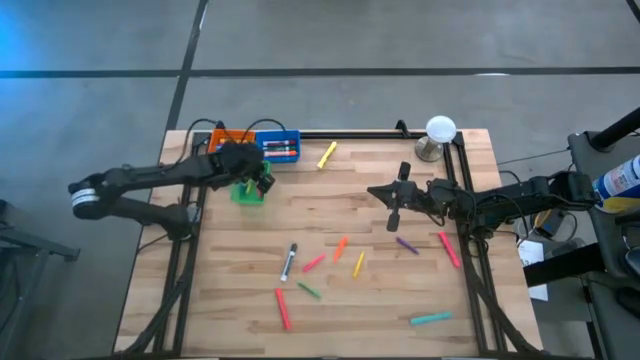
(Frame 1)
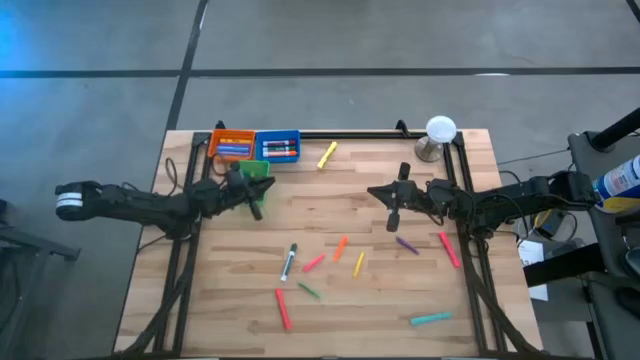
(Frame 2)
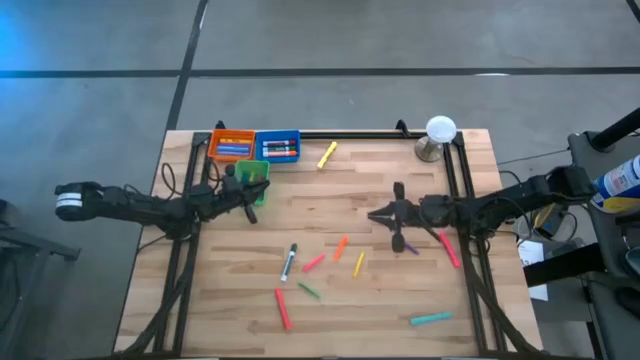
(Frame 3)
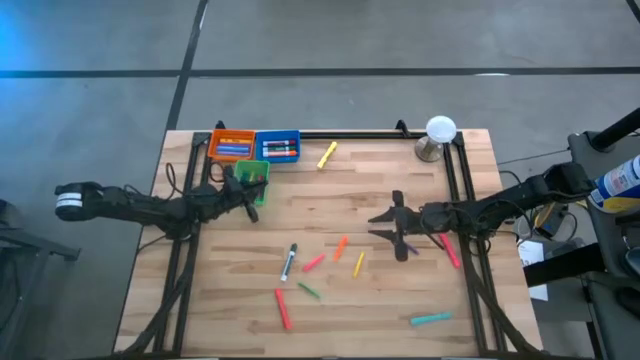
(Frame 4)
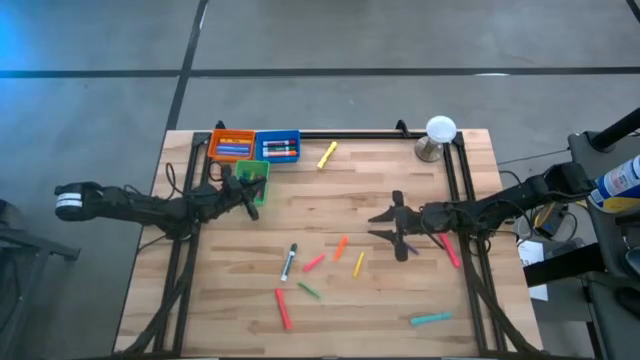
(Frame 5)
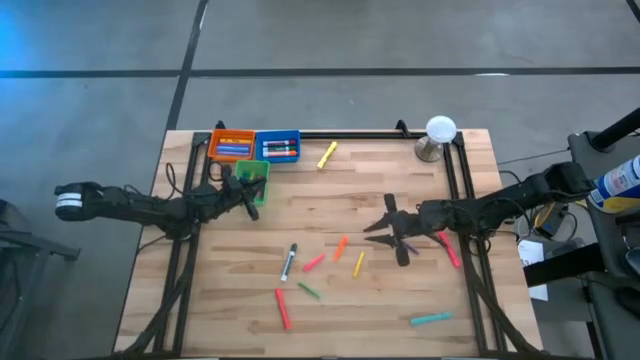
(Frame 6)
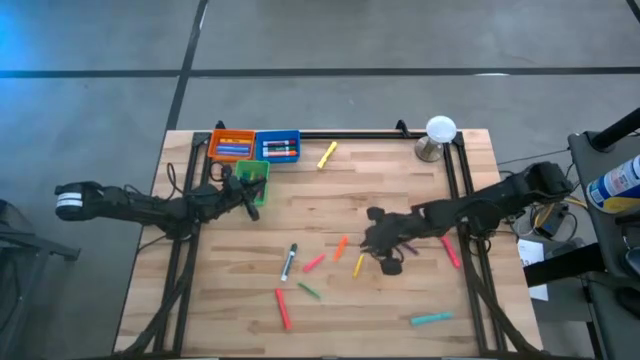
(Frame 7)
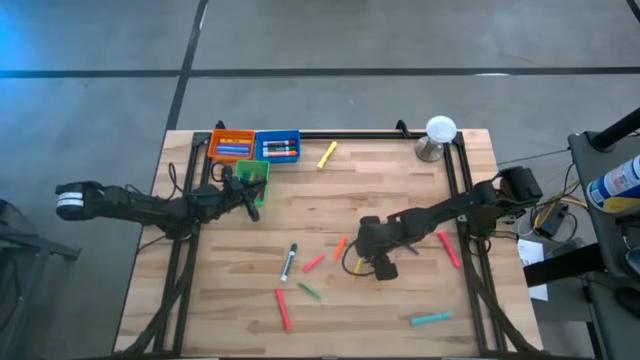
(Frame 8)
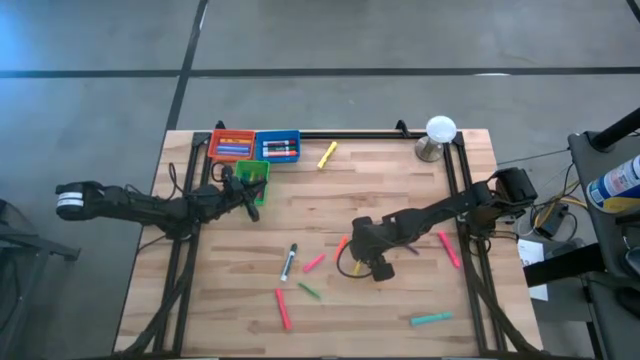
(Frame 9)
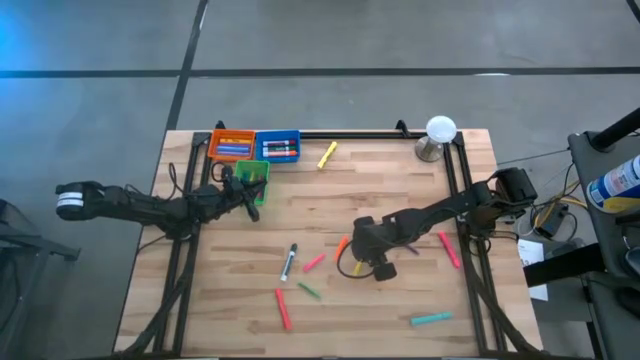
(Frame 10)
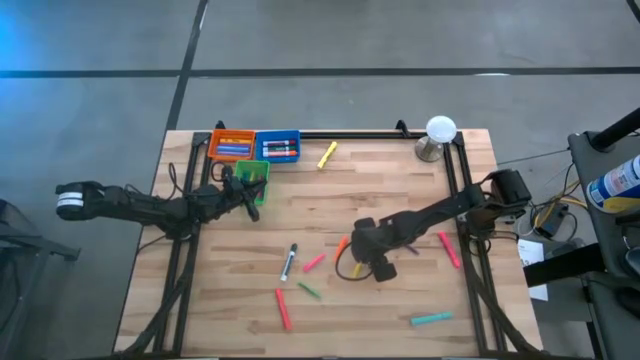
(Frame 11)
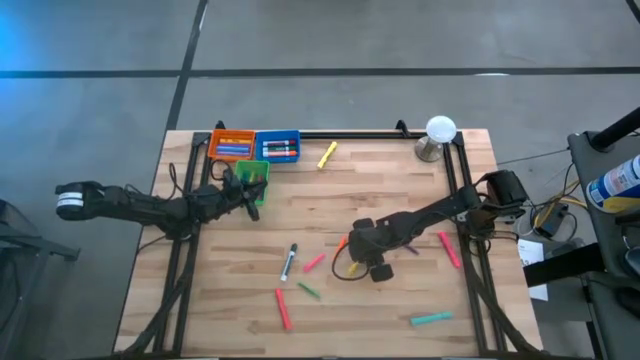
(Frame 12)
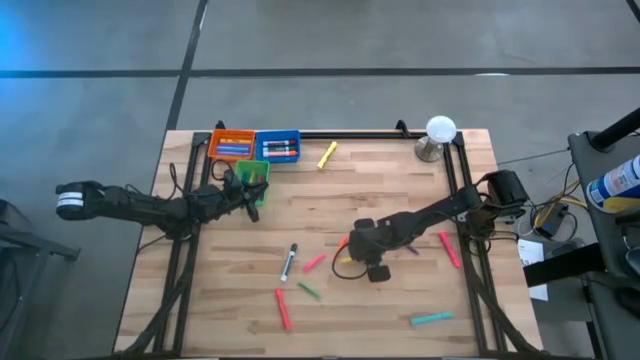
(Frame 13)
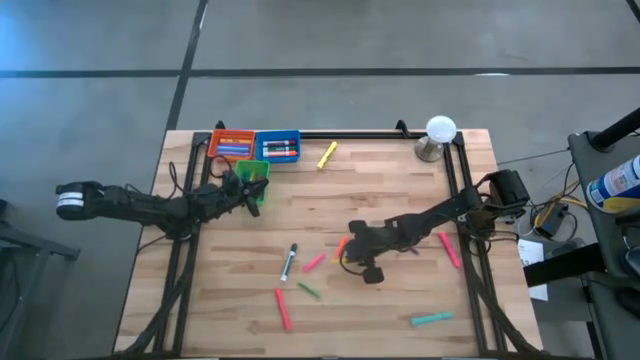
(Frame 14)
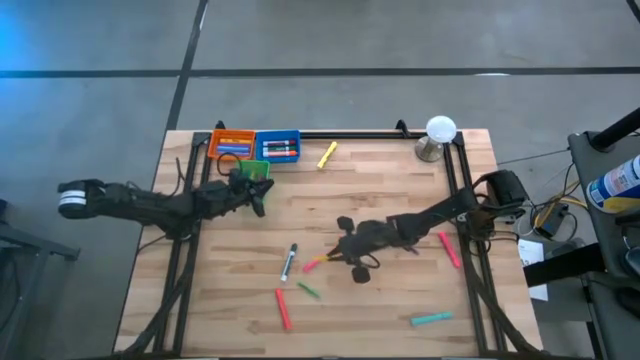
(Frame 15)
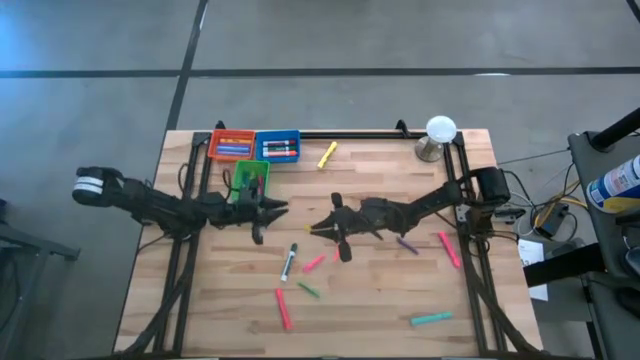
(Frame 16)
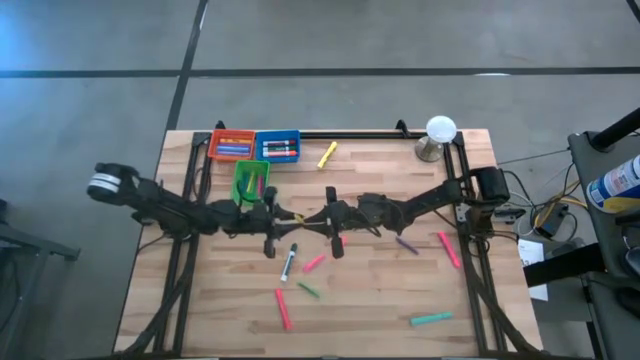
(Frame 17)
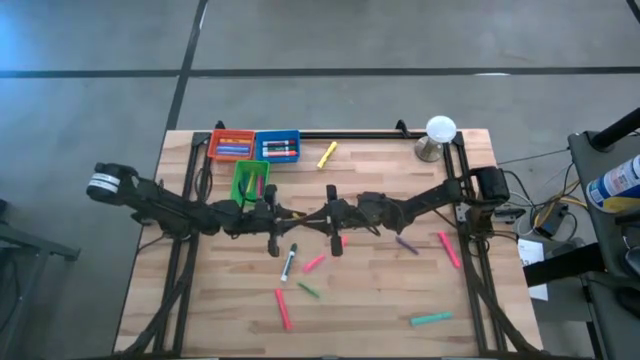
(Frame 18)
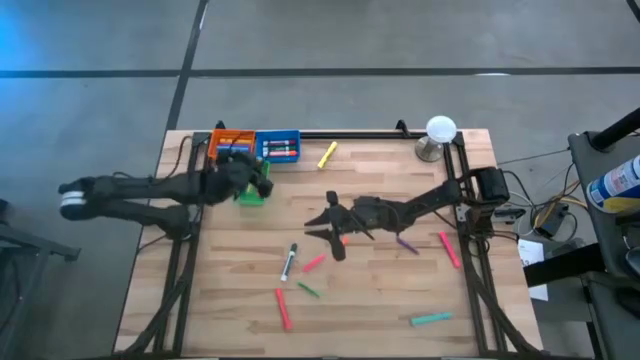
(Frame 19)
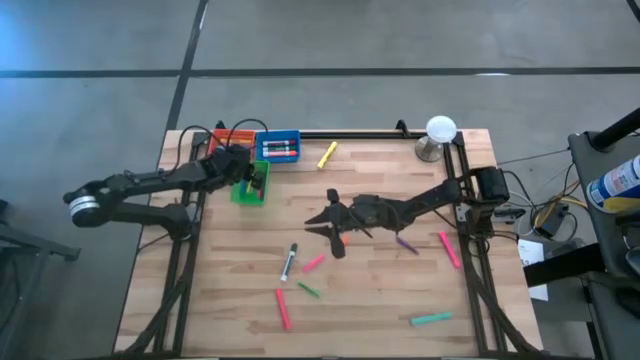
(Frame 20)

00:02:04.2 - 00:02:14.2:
Task: Pick & Place Markers
Put the yellow pen into the green bin

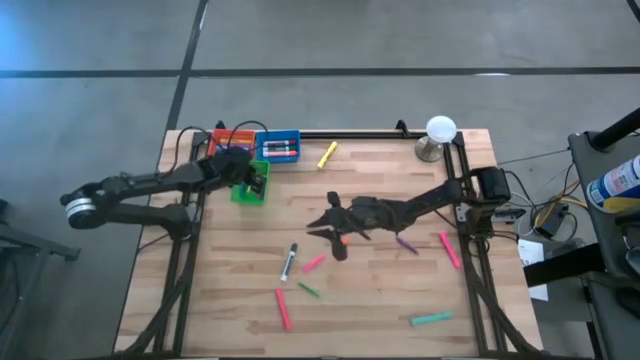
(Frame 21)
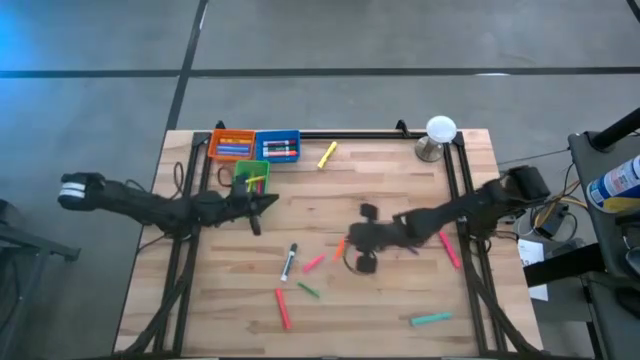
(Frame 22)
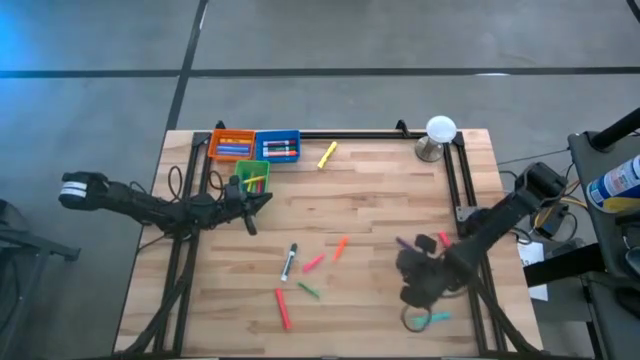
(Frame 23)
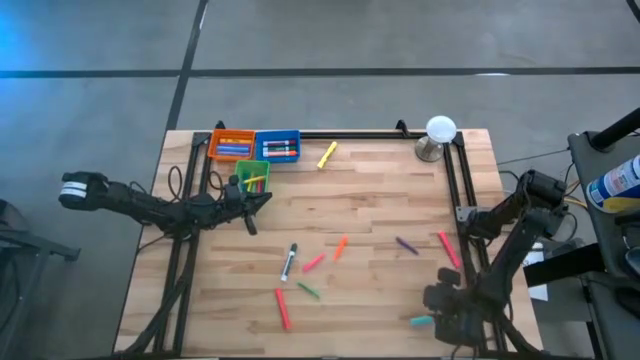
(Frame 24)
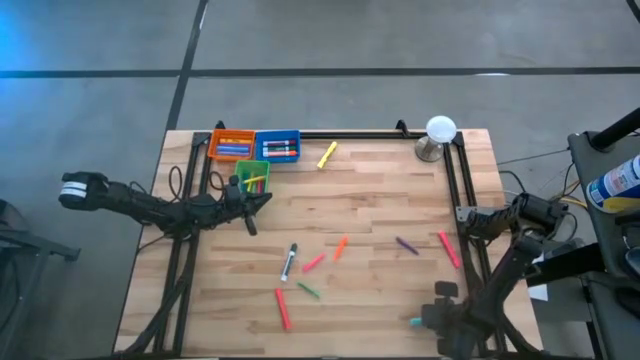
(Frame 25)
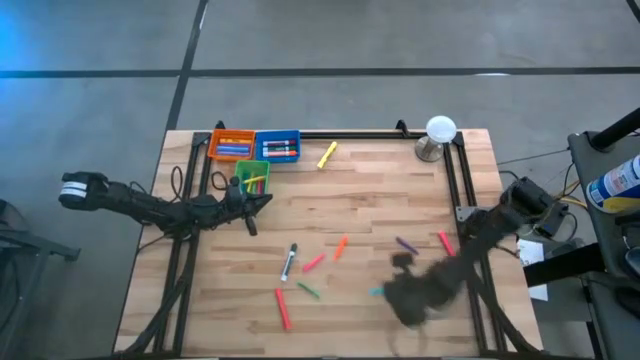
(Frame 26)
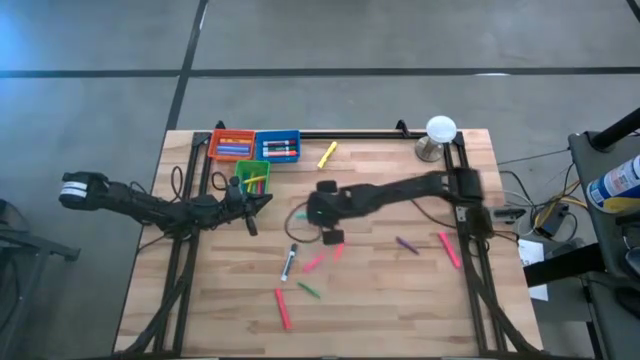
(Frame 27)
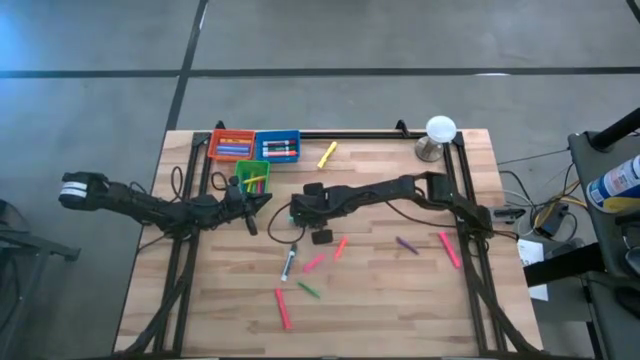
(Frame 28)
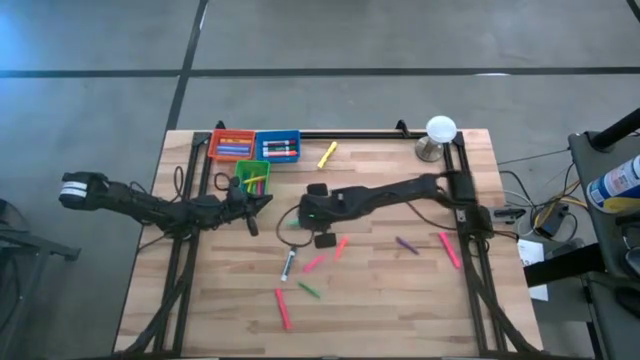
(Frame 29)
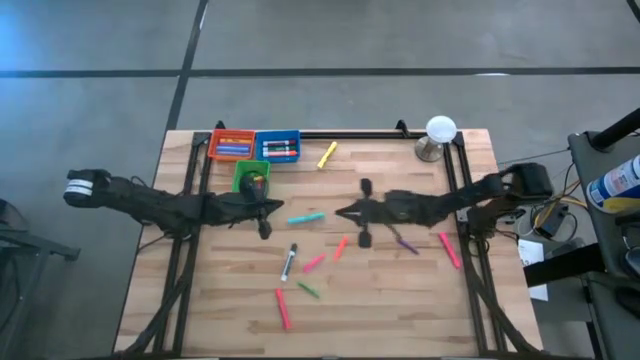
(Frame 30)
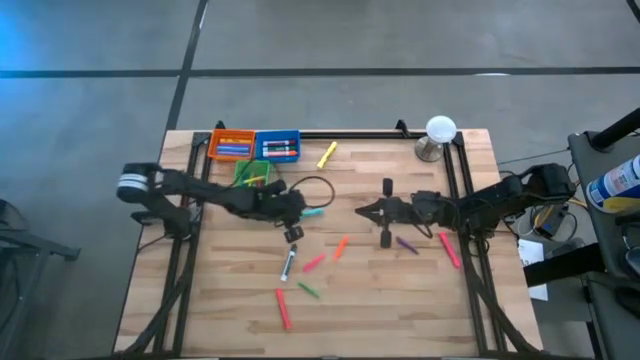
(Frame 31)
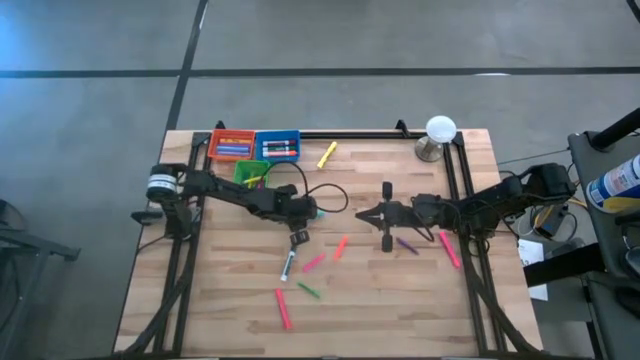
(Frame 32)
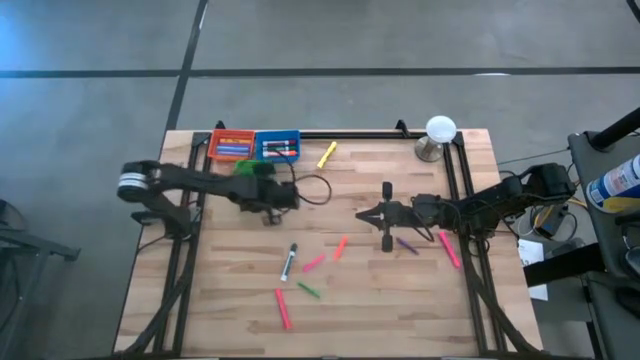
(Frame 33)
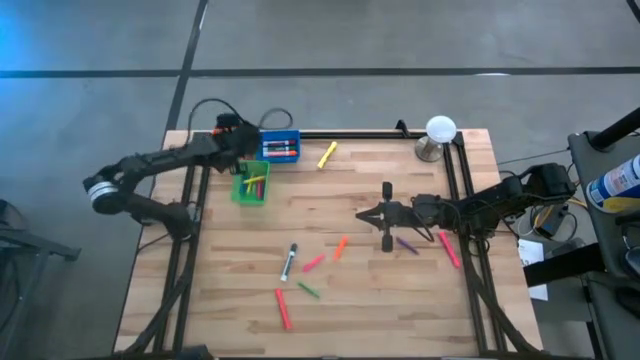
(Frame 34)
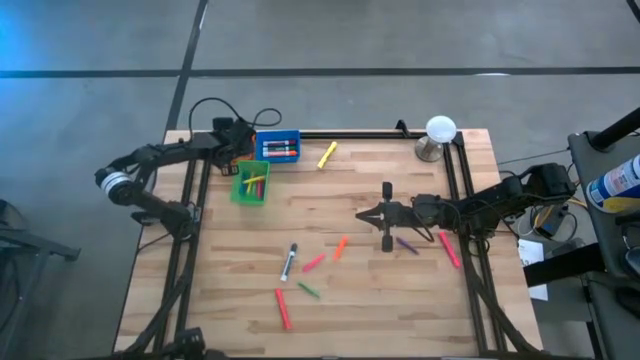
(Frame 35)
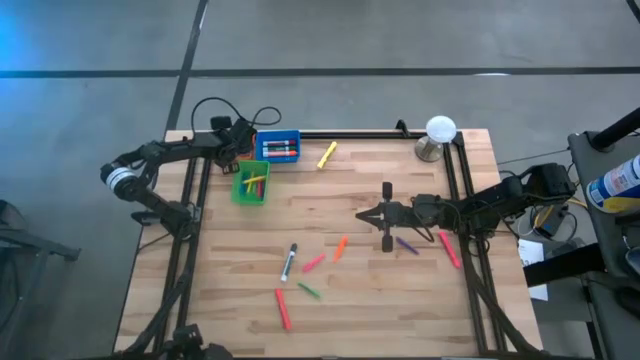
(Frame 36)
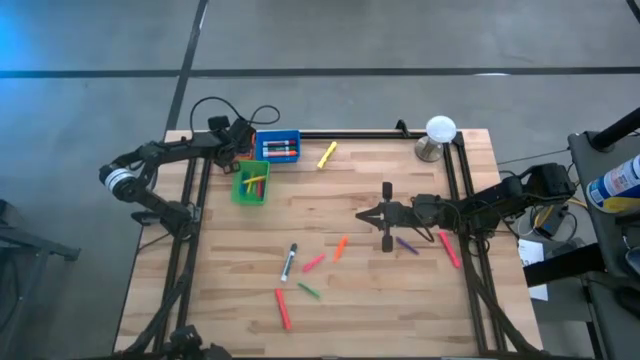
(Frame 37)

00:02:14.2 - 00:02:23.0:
Put the light blue highlighter into the orange bin

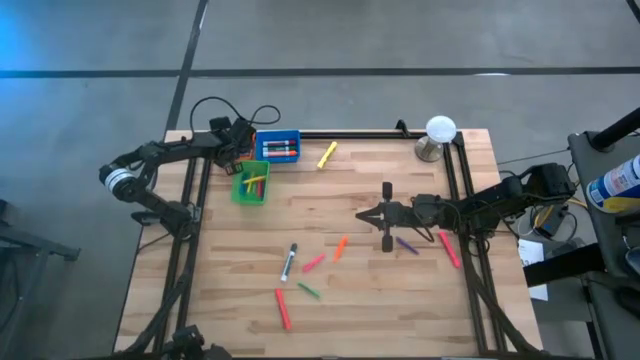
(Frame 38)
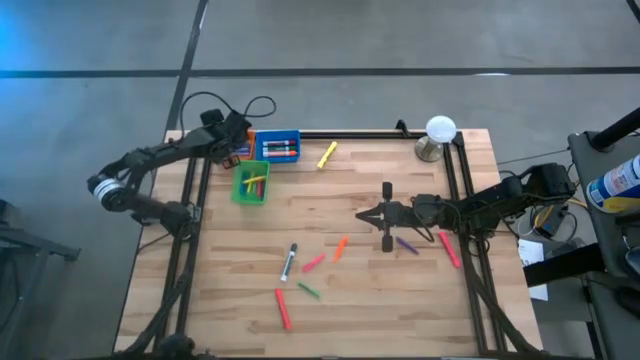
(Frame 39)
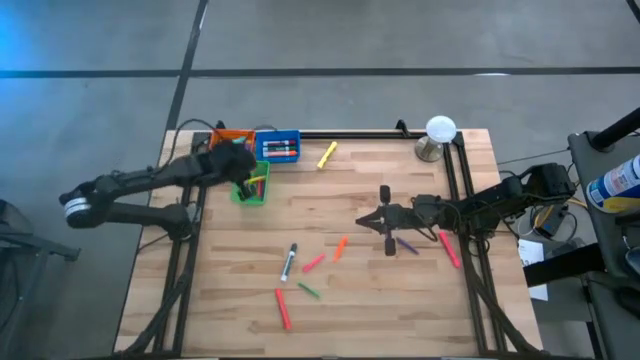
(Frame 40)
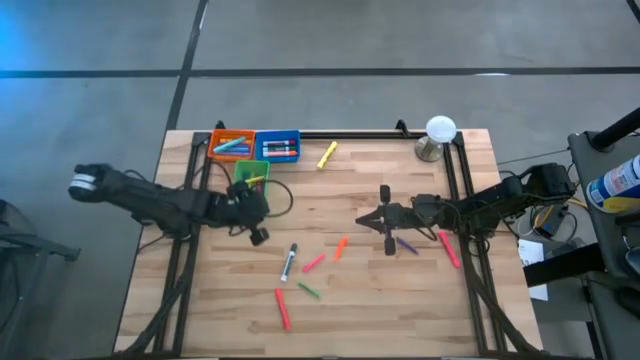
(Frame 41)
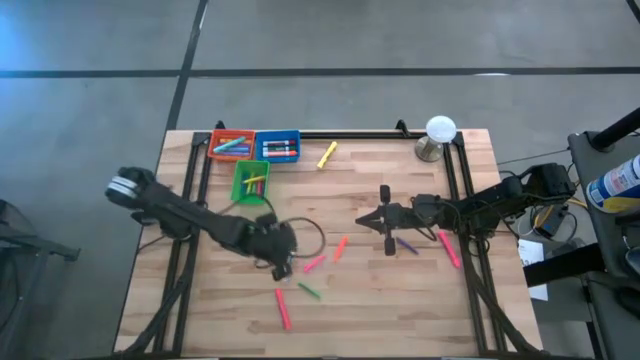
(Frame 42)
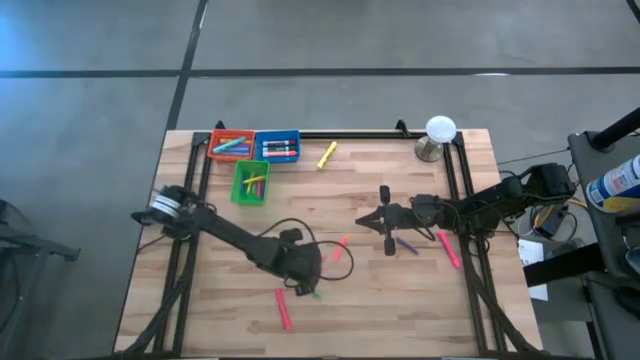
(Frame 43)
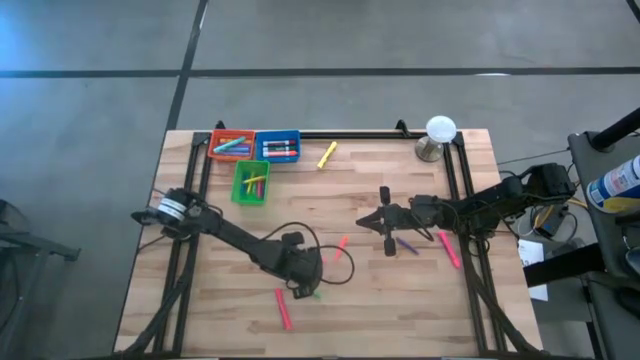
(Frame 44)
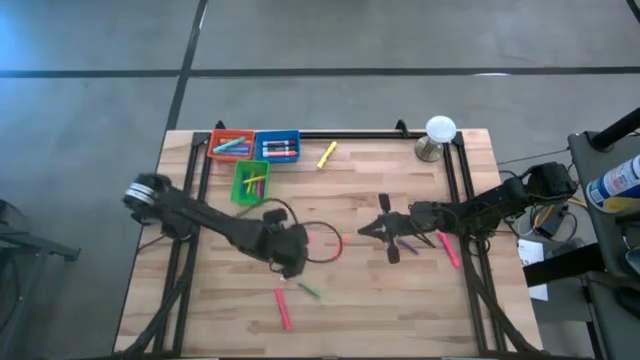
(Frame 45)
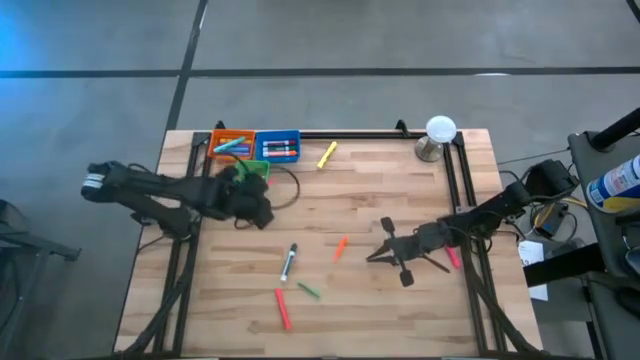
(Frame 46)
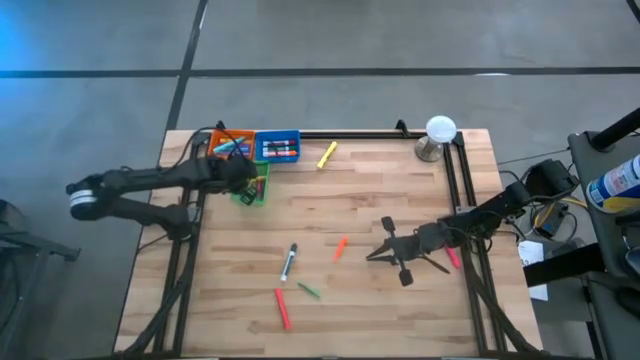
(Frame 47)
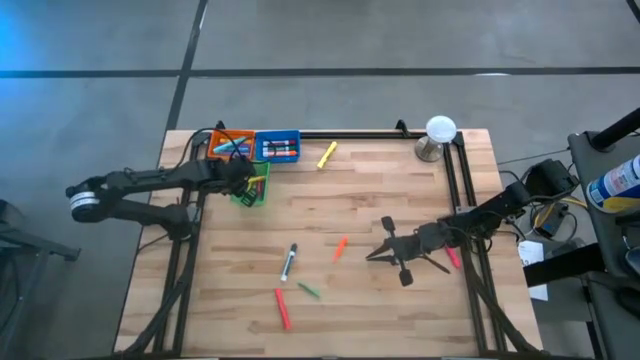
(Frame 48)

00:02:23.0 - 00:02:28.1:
Put the pink pen into the green bin
